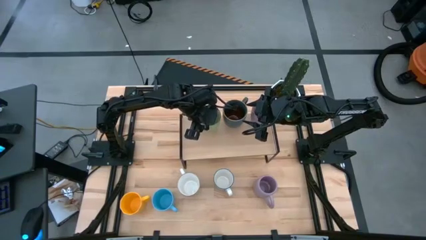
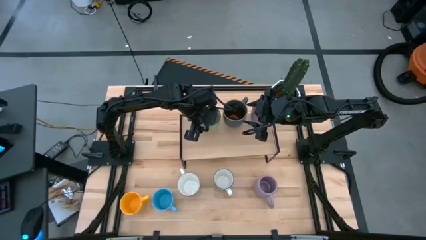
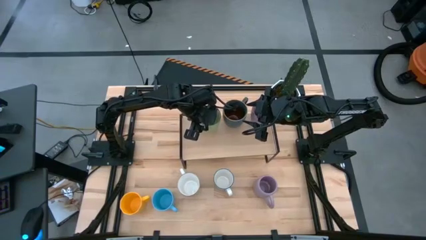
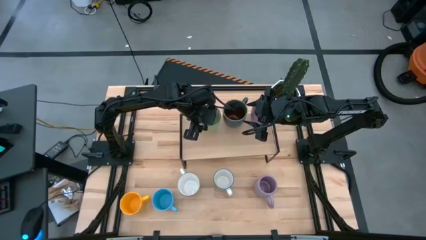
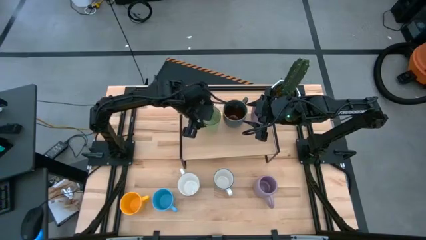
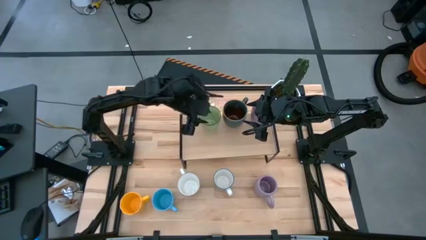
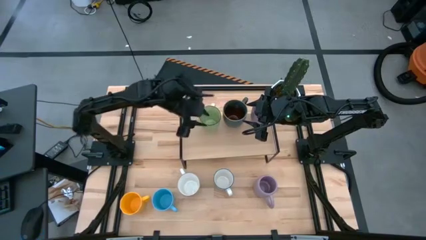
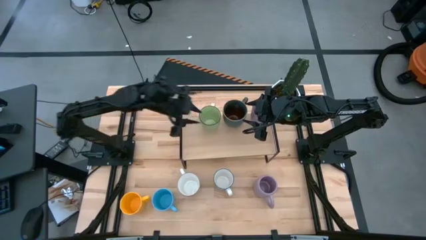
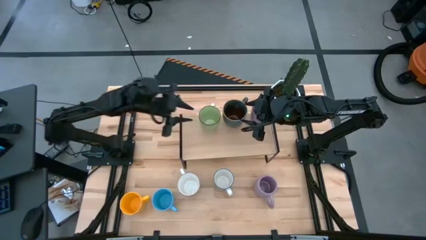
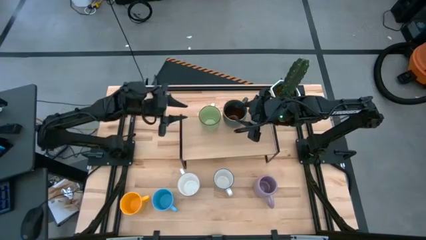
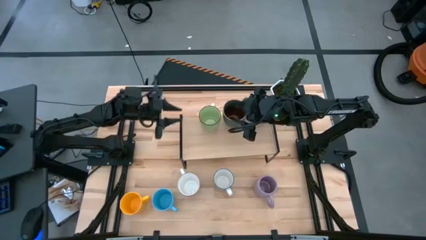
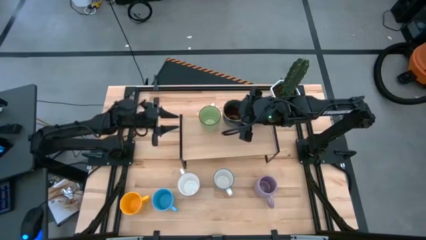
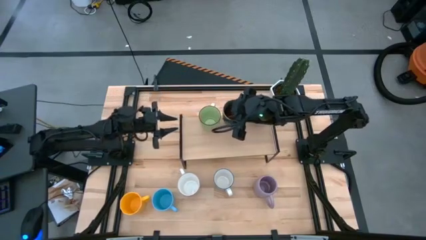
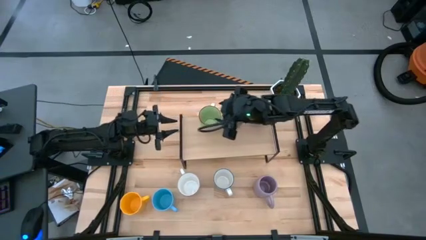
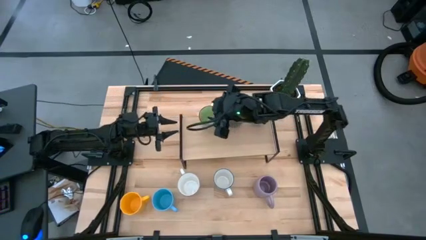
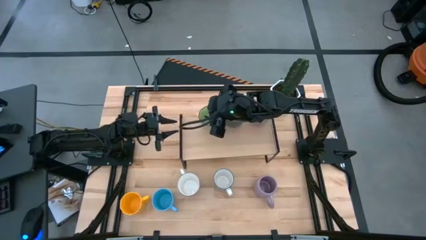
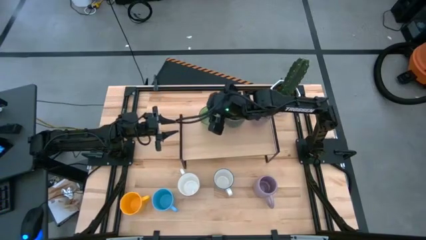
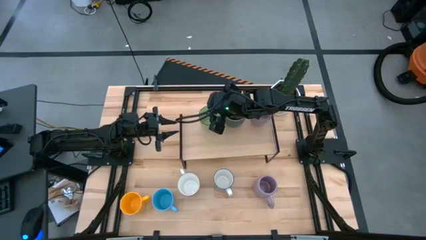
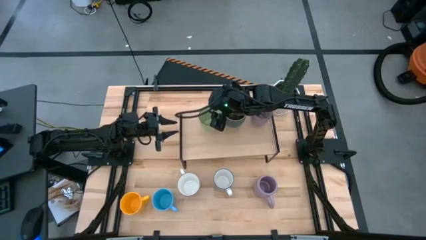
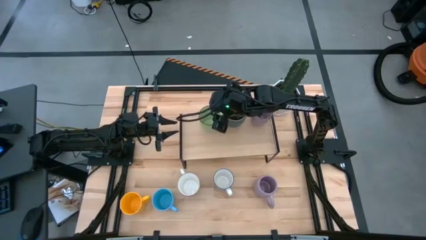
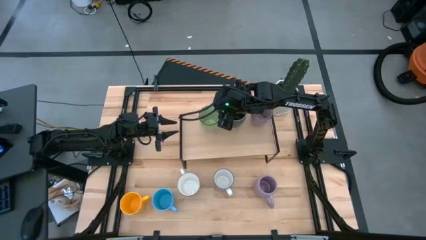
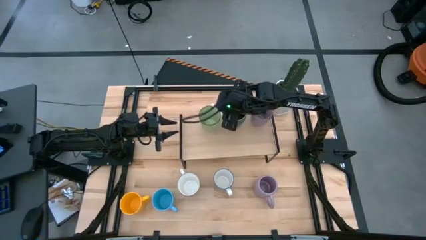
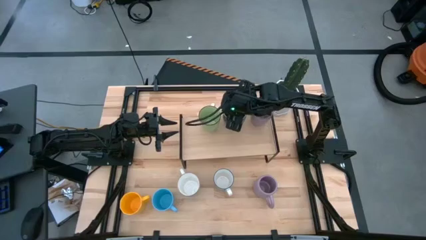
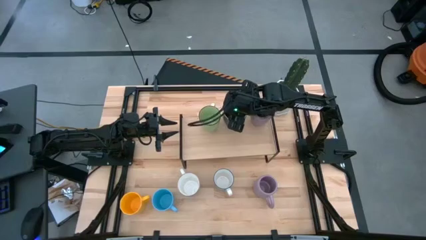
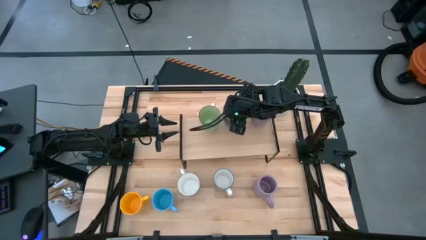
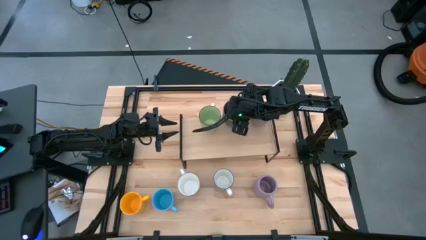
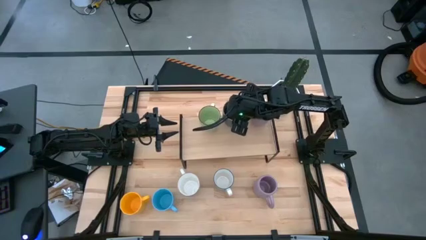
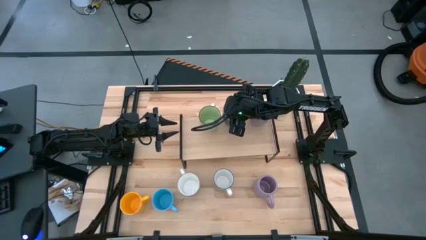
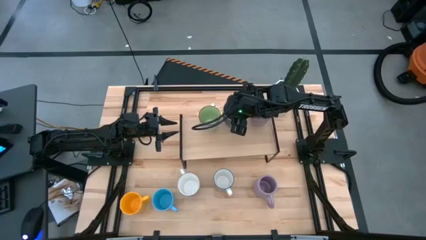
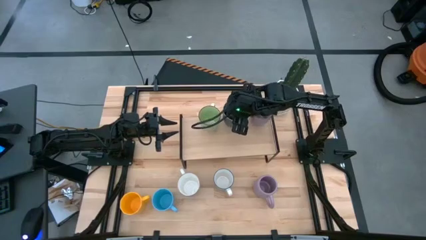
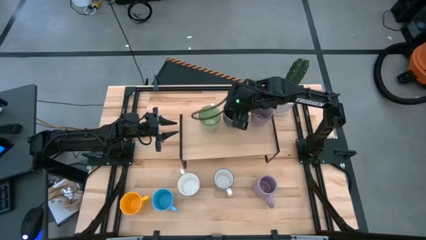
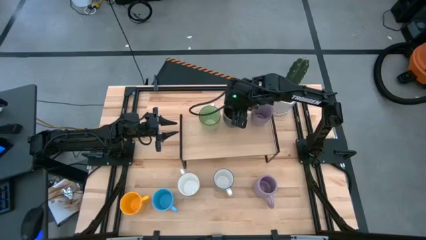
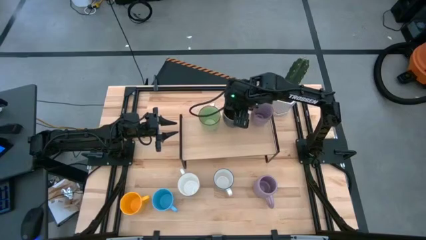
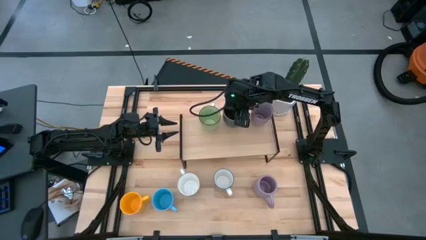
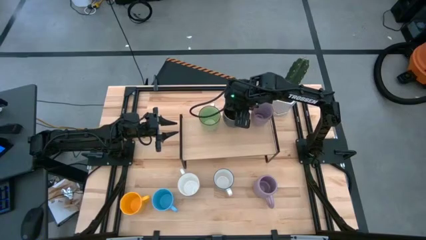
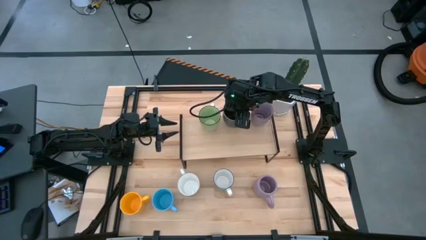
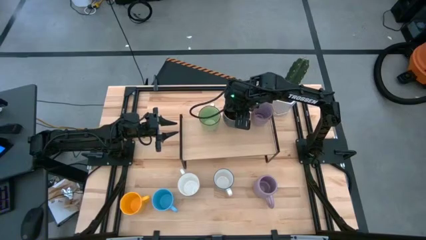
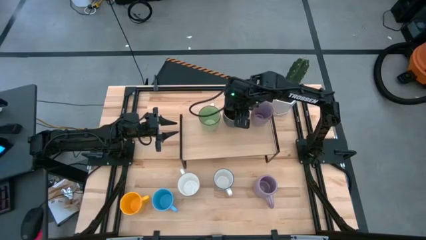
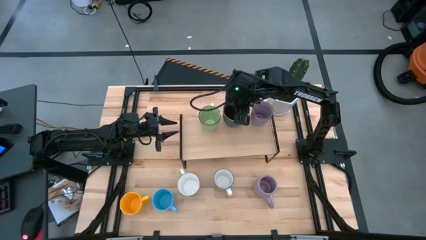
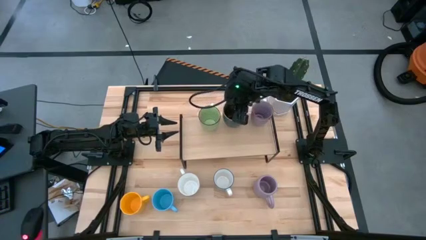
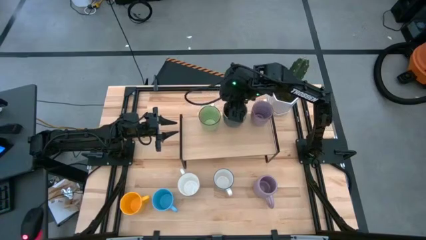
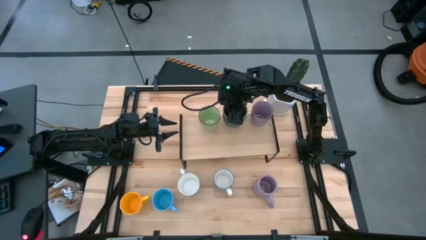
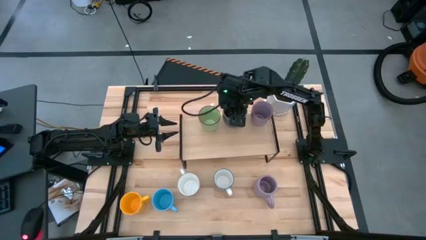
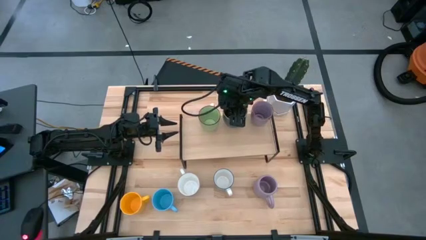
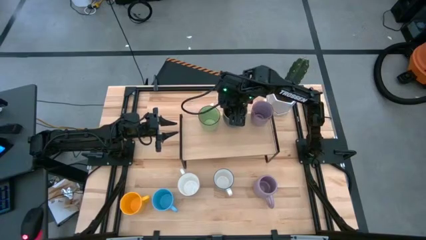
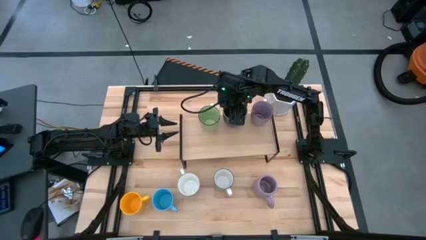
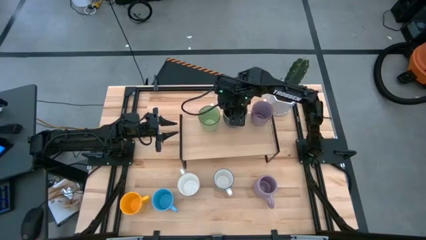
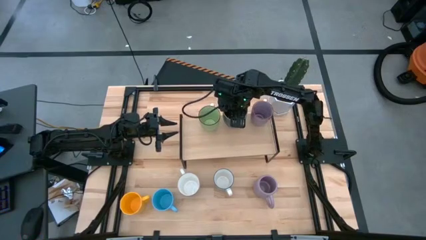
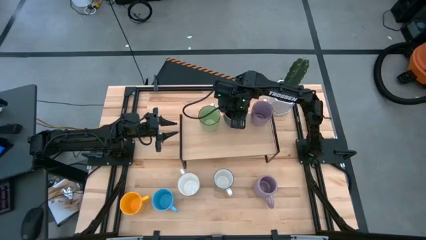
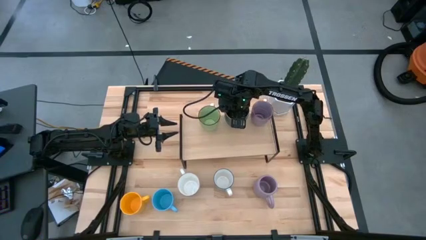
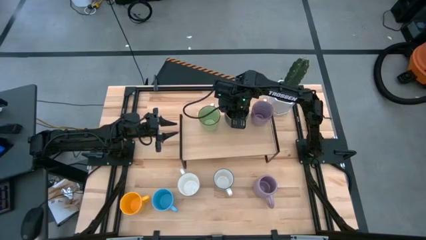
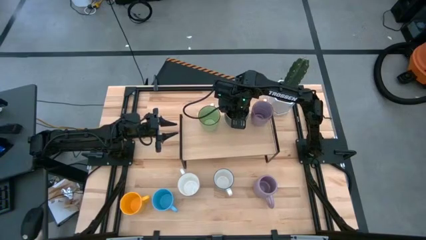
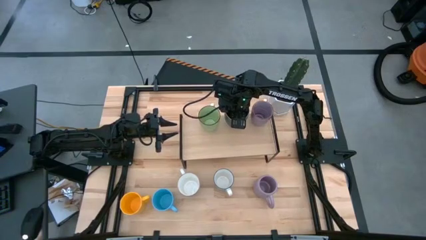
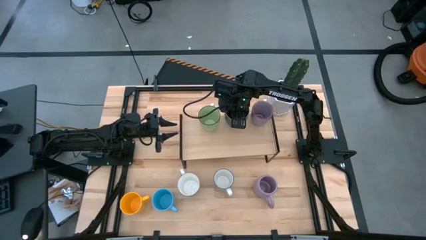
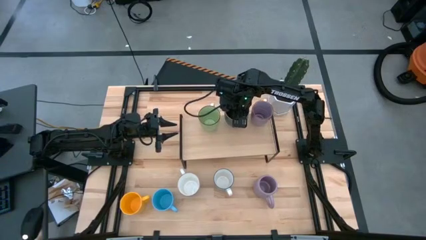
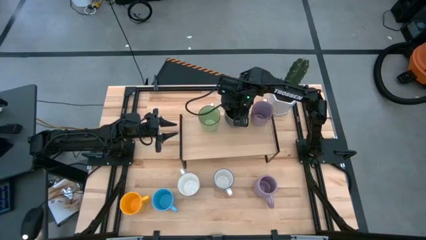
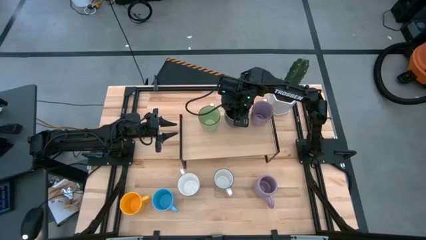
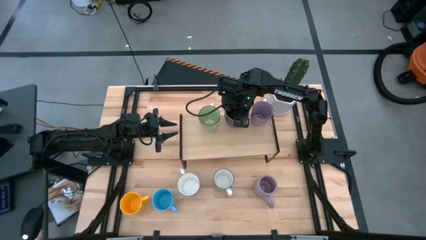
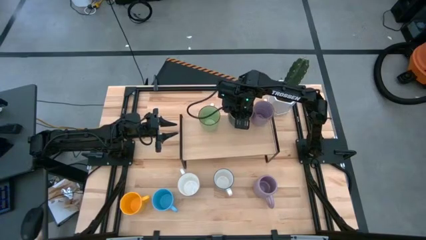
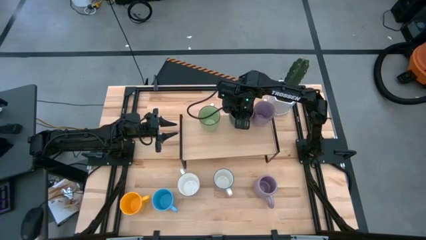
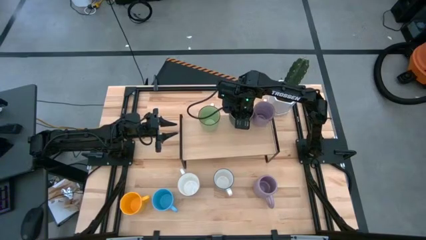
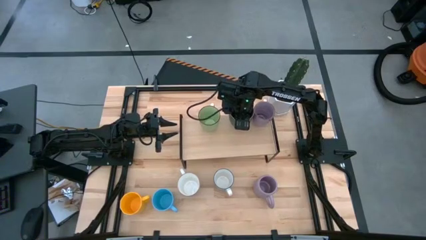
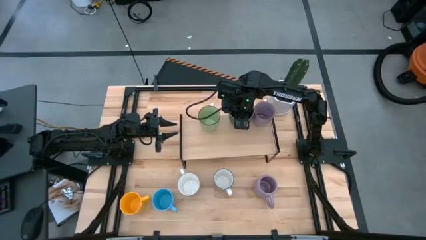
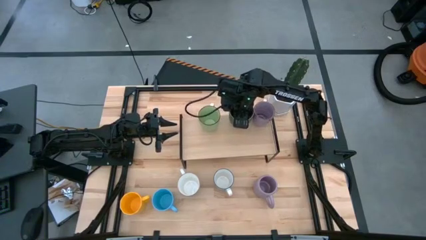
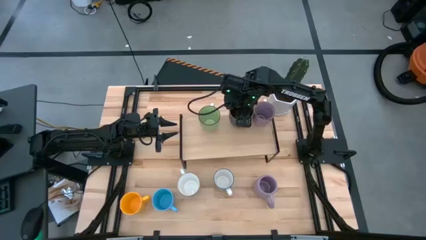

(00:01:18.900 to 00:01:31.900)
Task: Place coffee mugs
Adjust the dark green mug on the shelf

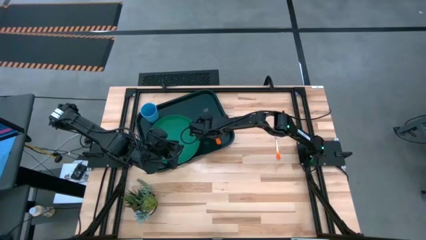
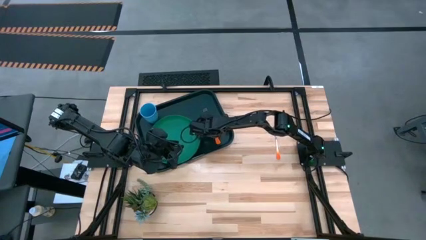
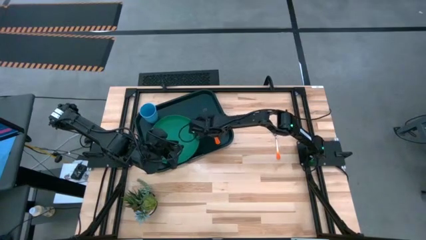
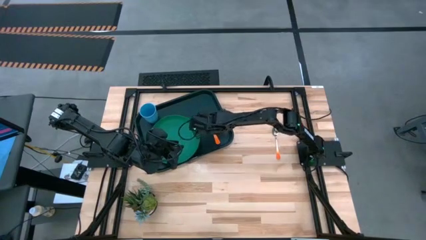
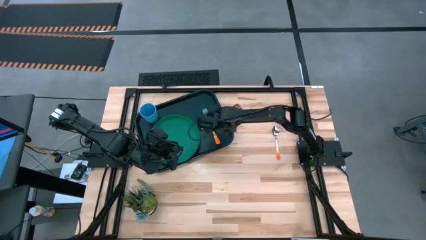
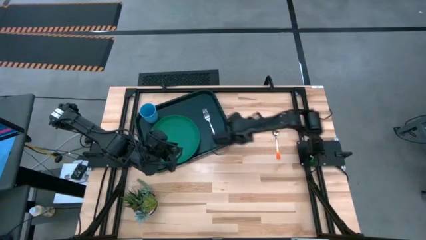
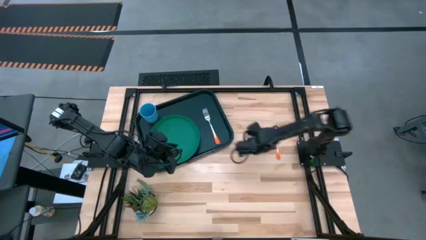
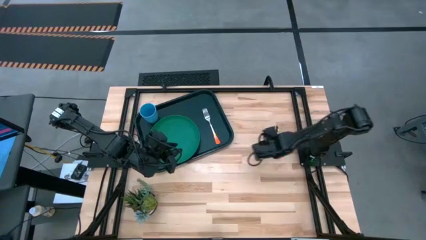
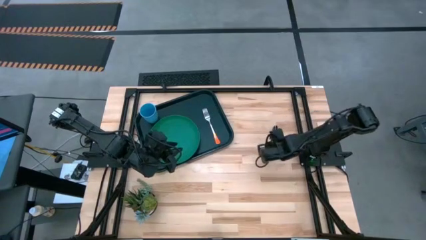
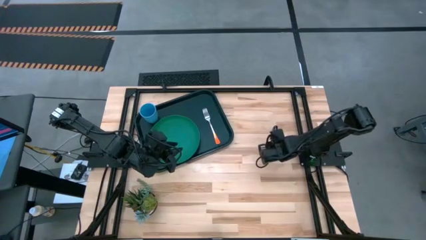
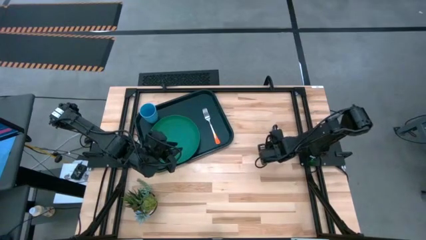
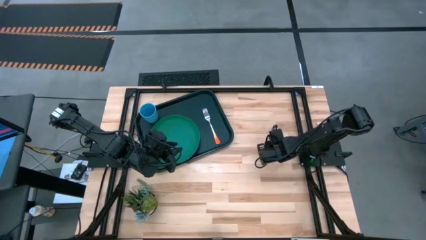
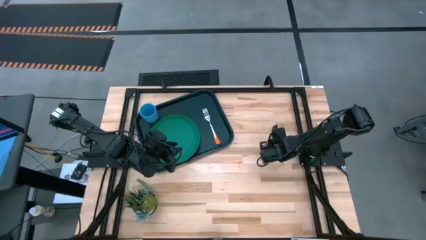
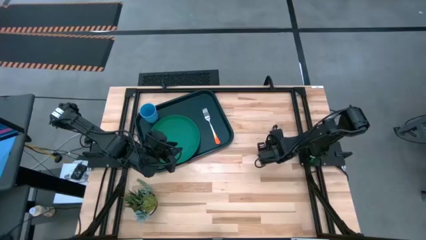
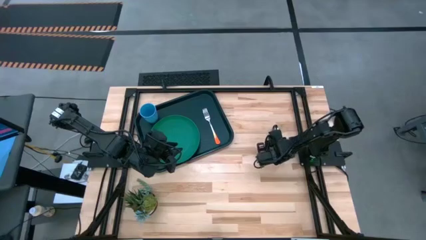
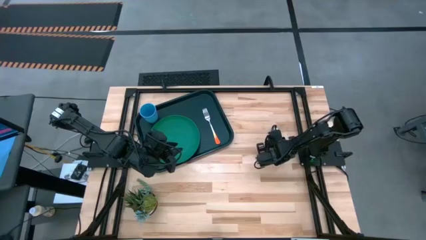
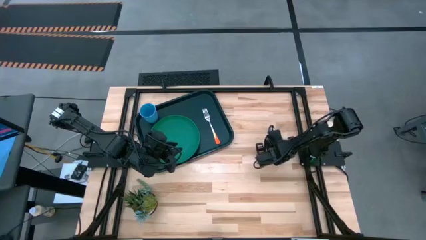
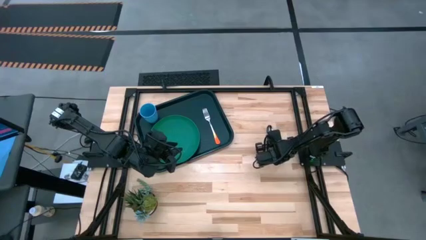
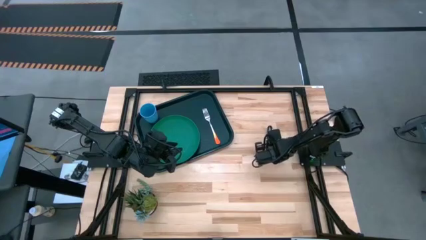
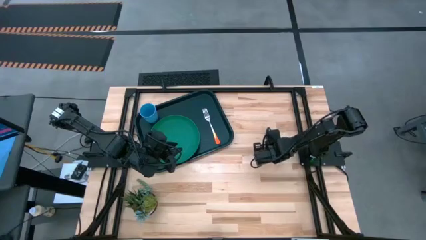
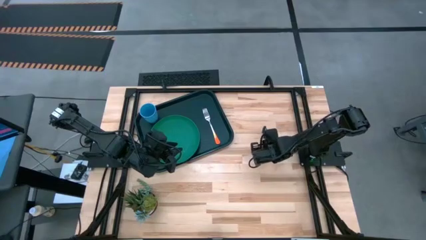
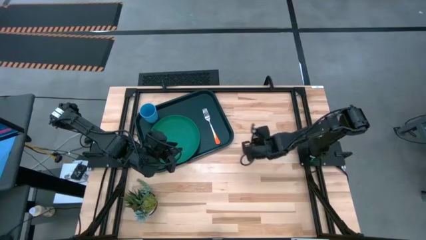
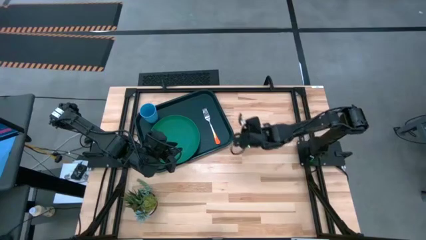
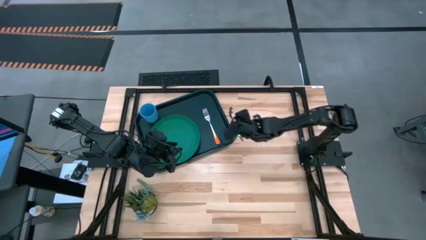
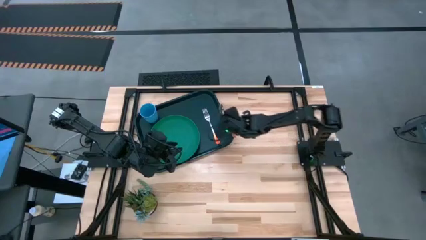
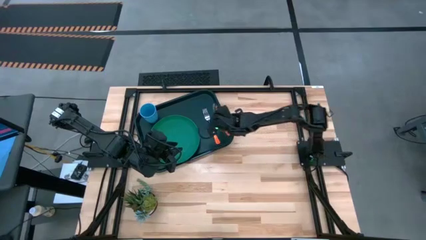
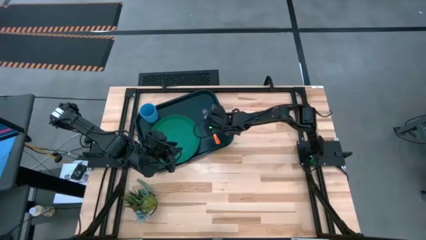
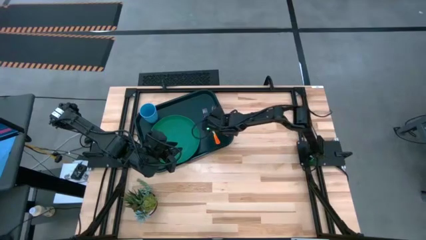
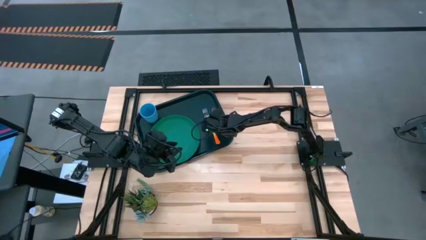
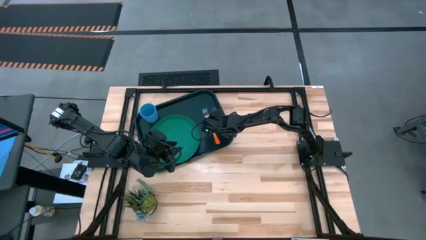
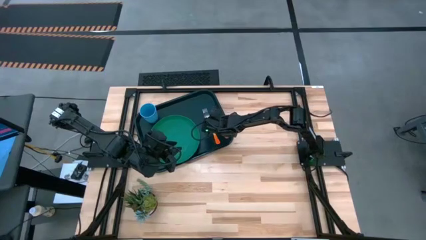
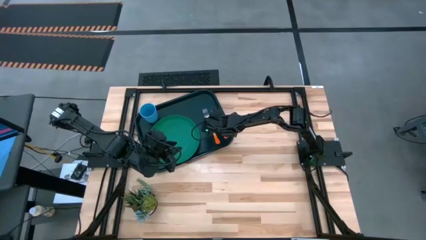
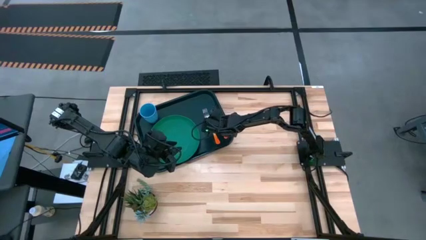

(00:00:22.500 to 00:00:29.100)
Task: Pick and place plate/cup/fork/spoon on tray
Put the orange spoon on the black tray to the right of the orange fork
